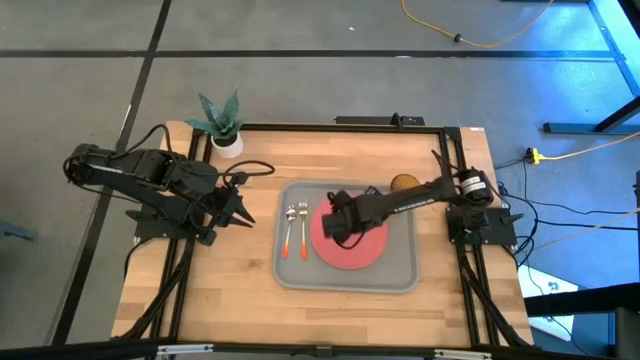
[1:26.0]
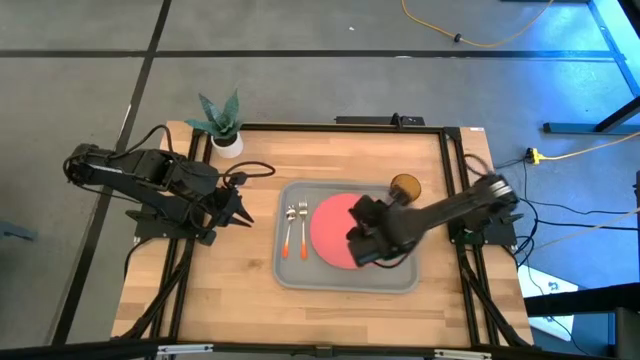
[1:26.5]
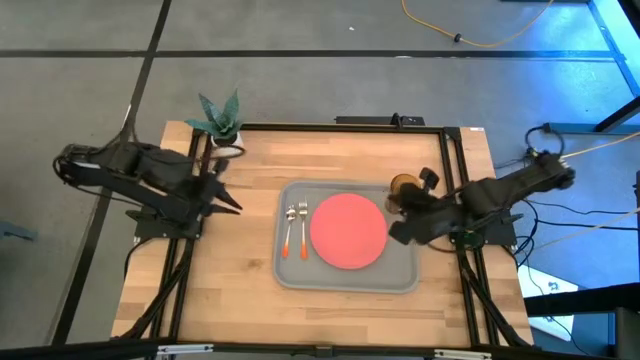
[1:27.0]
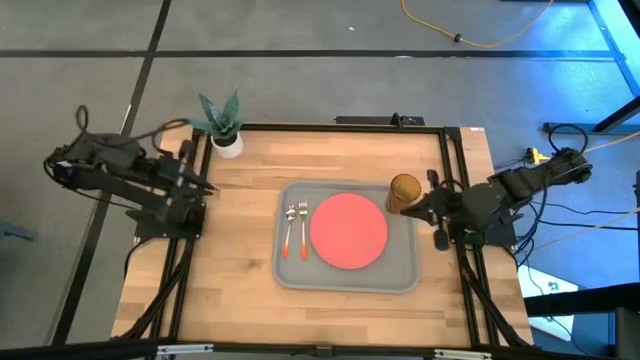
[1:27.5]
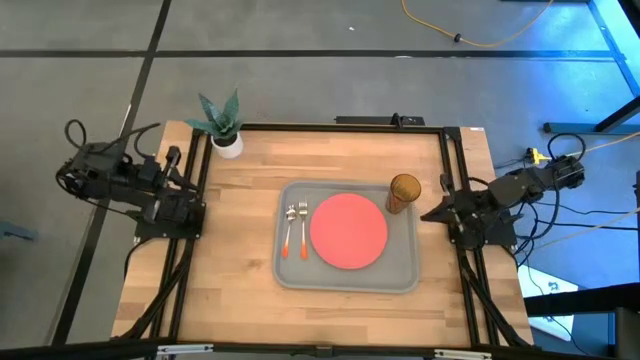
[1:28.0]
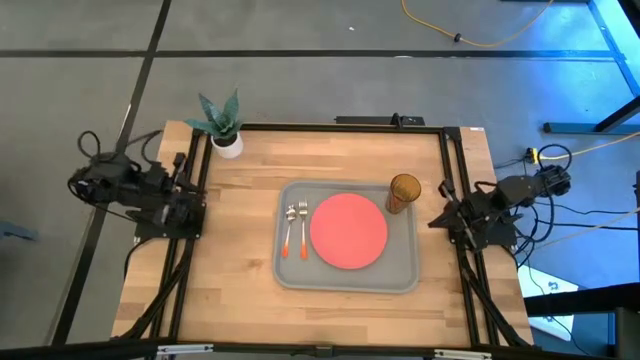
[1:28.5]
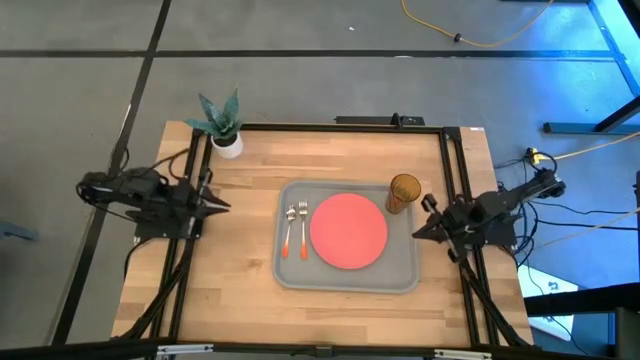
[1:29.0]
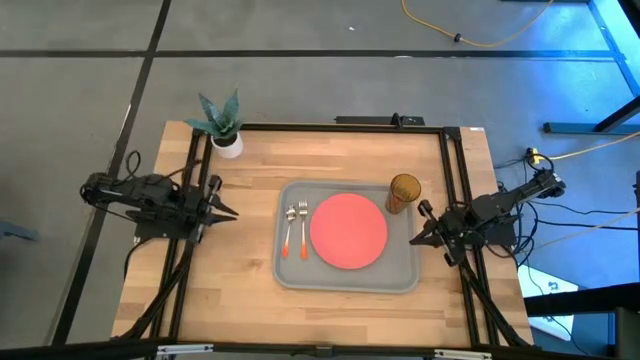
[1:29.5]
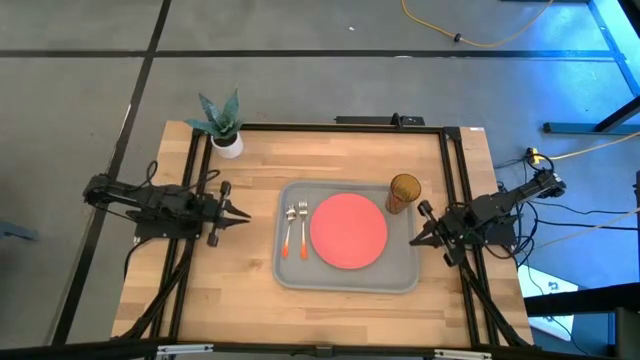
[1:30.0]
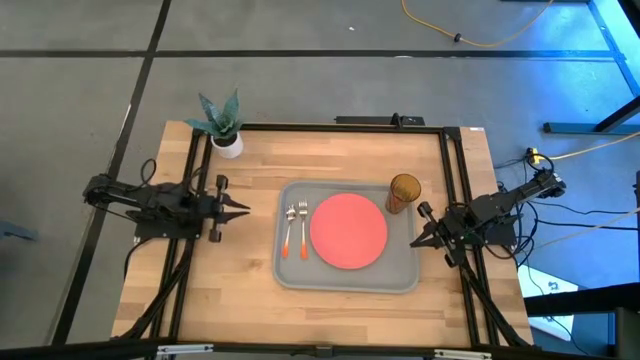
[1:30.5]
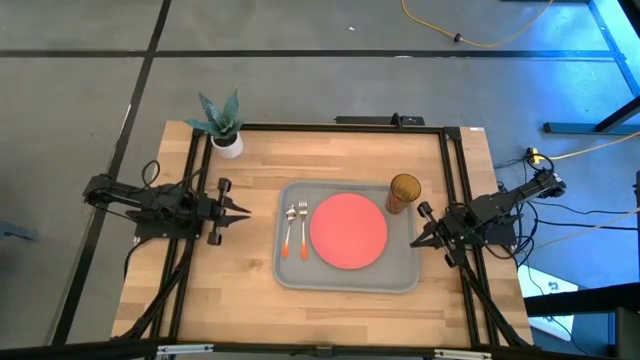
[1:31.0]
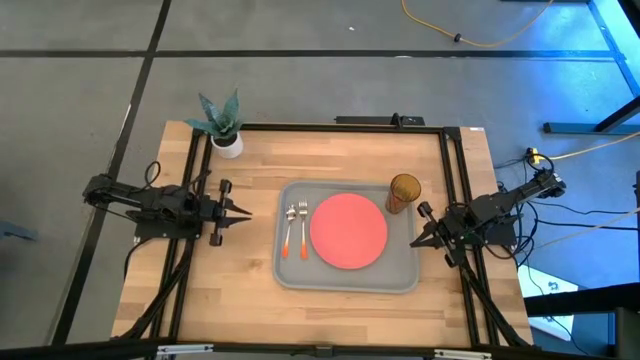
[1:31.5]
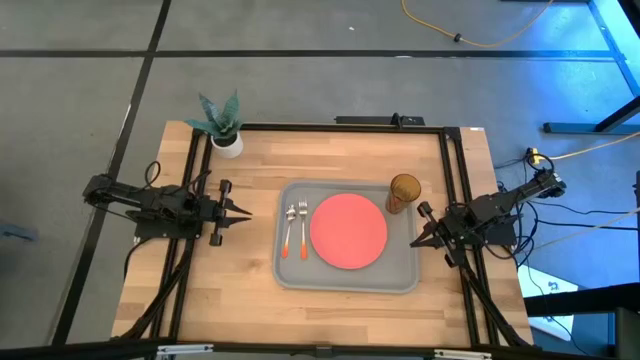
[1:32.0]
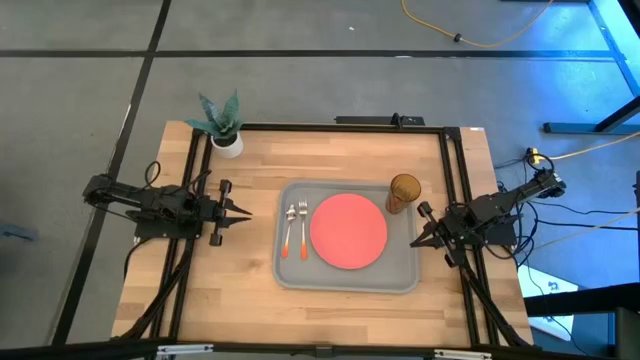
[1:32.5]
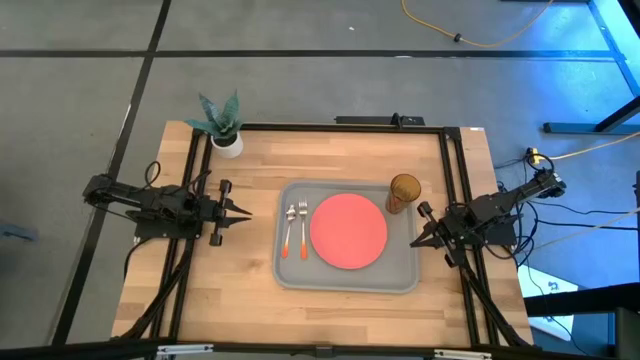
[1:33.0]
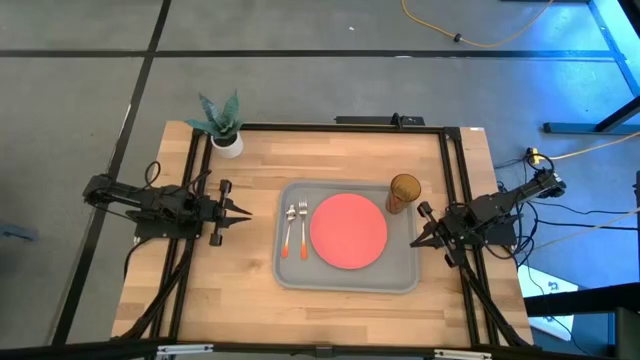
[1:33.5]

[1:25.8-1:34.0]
Task: Pick and place plate/cup/fork/spoon on tray
Return to Home Position

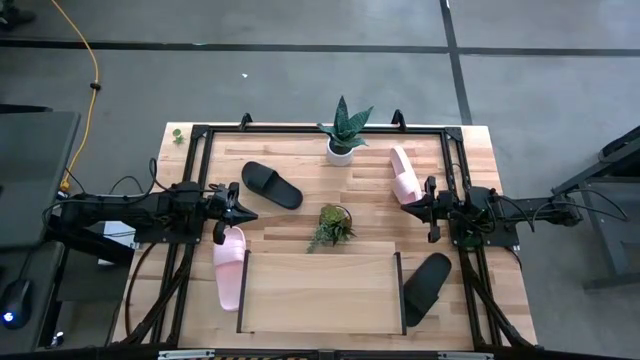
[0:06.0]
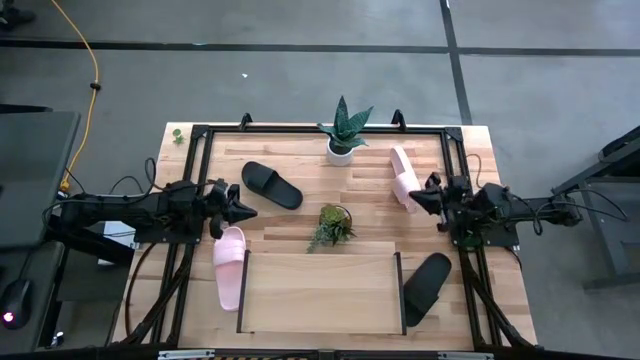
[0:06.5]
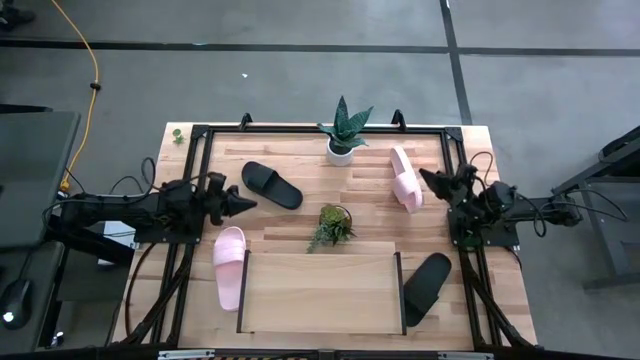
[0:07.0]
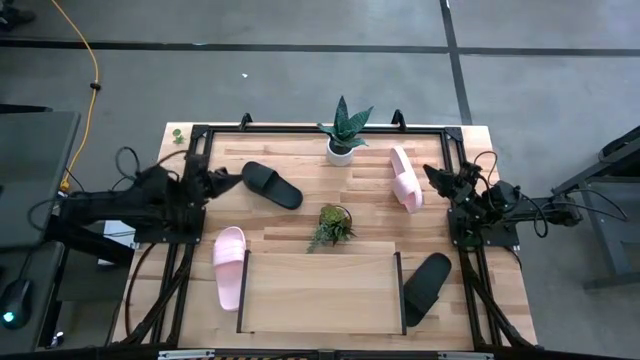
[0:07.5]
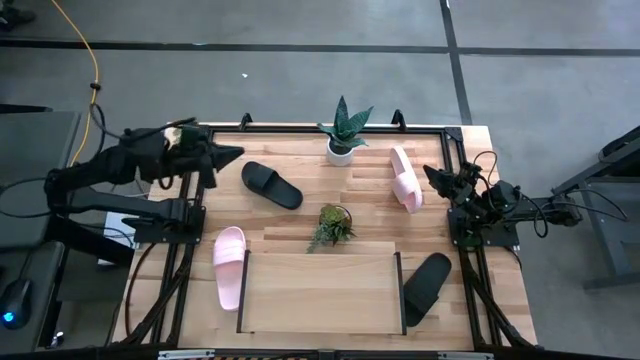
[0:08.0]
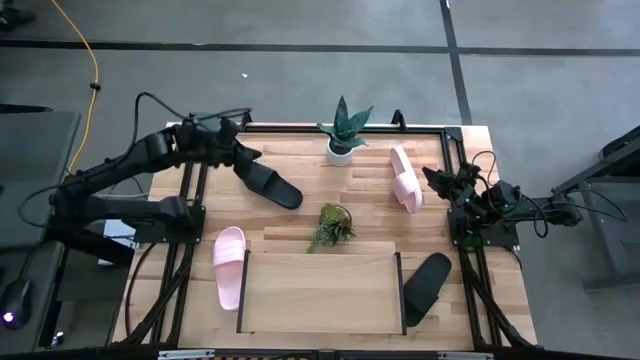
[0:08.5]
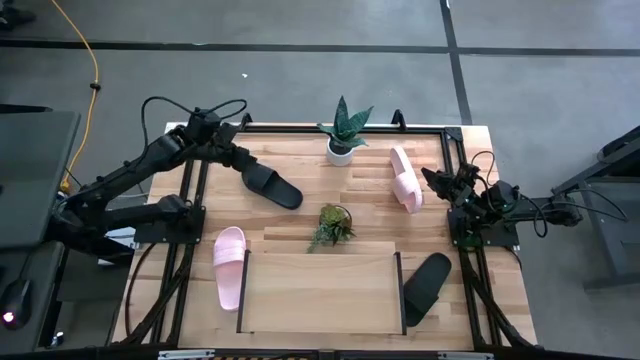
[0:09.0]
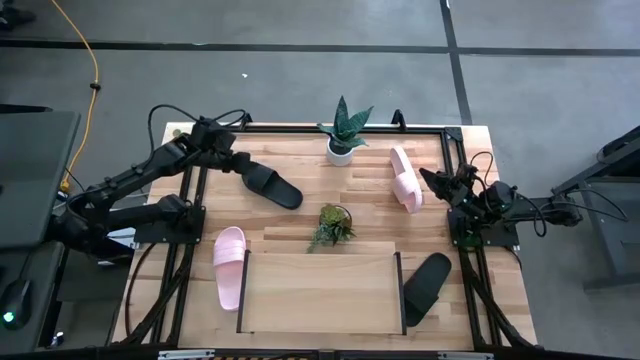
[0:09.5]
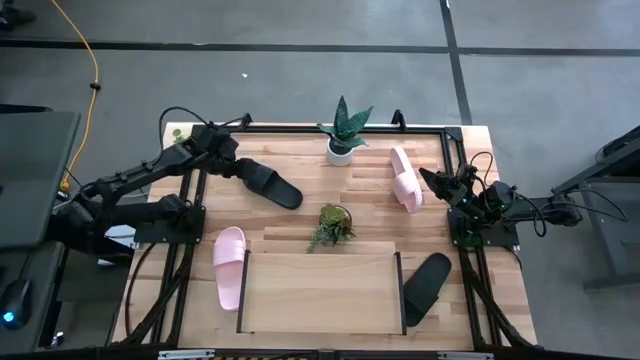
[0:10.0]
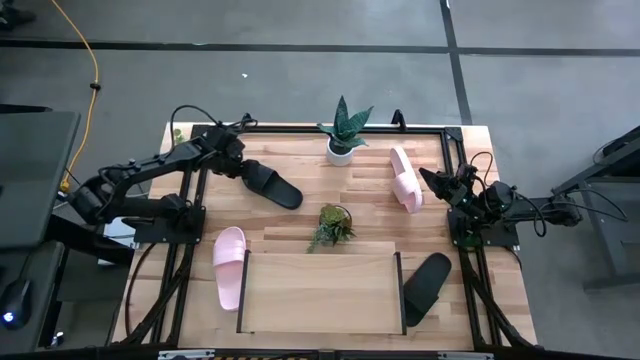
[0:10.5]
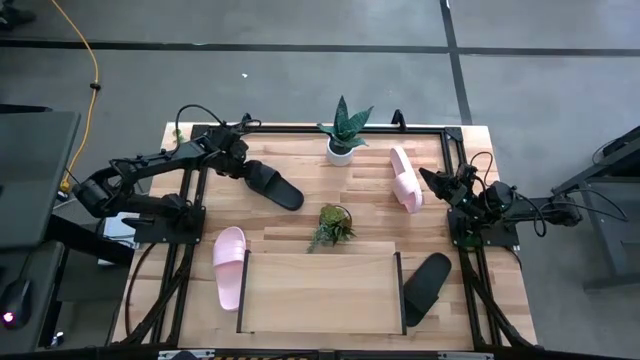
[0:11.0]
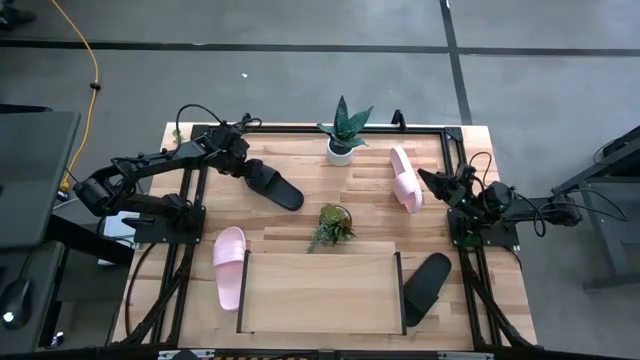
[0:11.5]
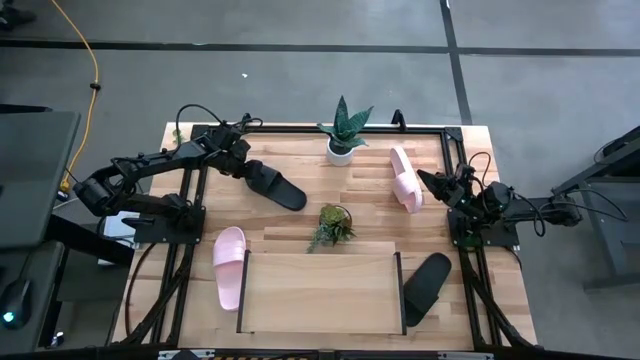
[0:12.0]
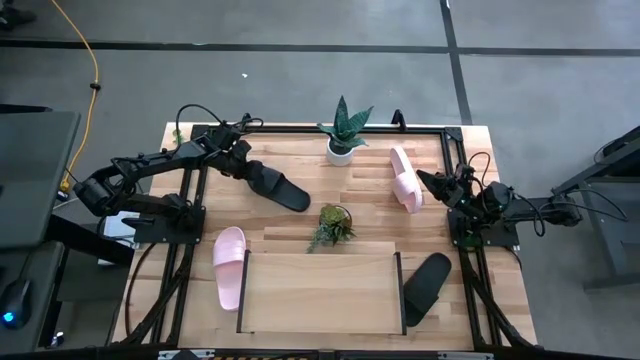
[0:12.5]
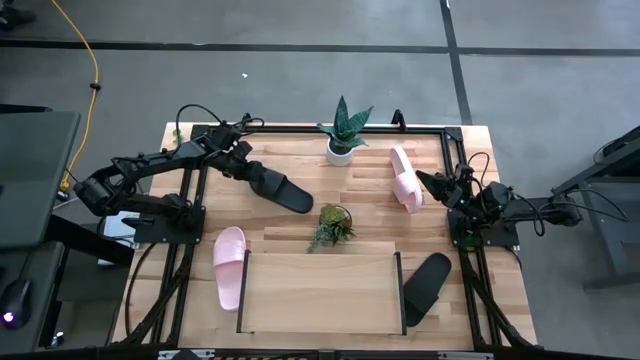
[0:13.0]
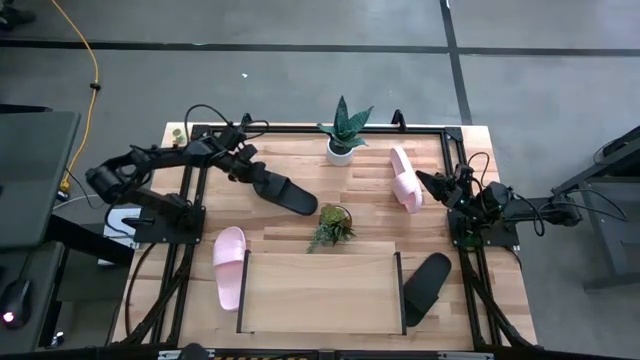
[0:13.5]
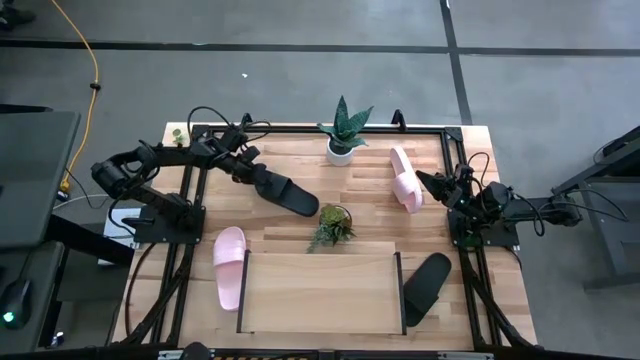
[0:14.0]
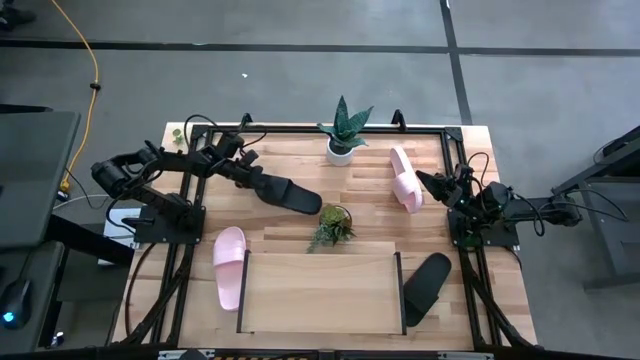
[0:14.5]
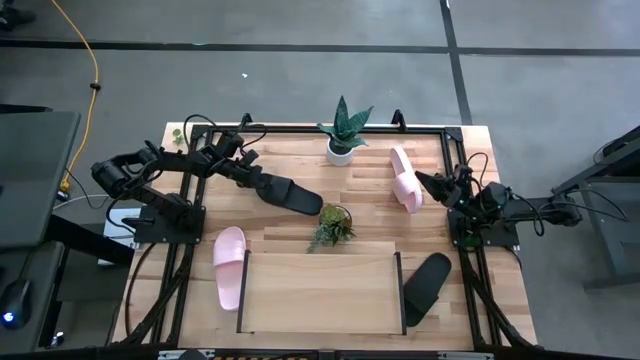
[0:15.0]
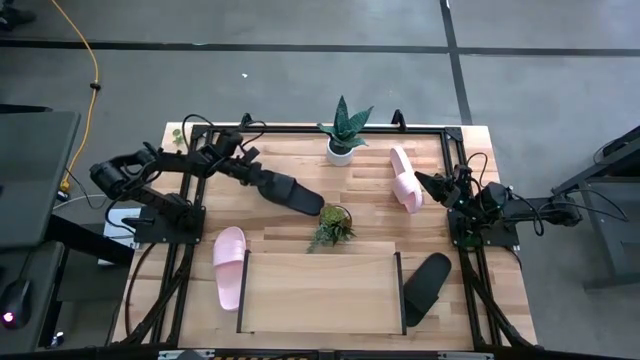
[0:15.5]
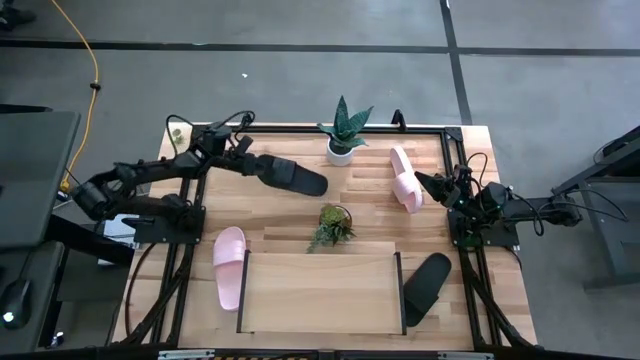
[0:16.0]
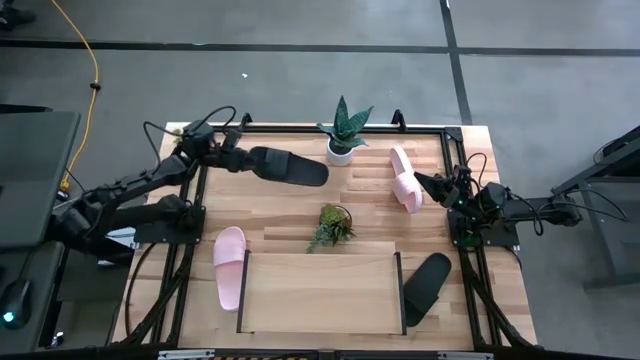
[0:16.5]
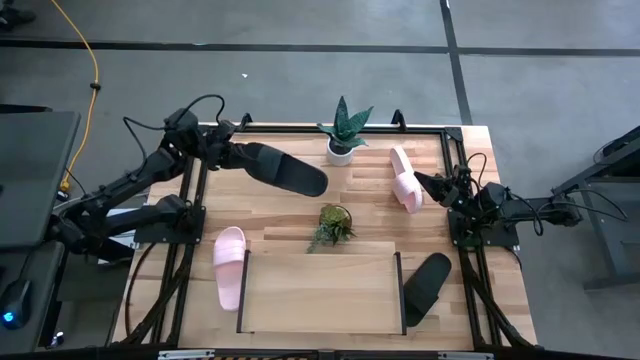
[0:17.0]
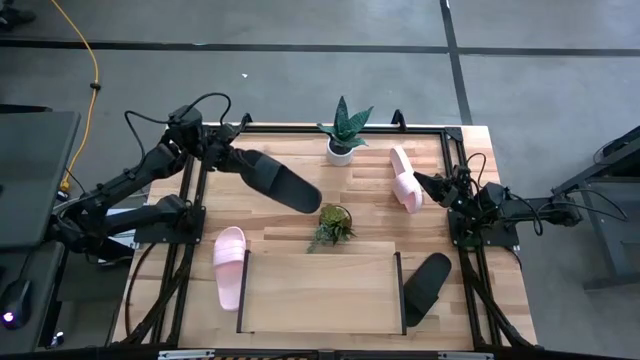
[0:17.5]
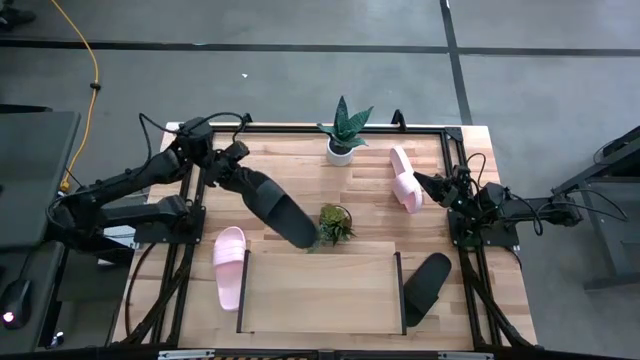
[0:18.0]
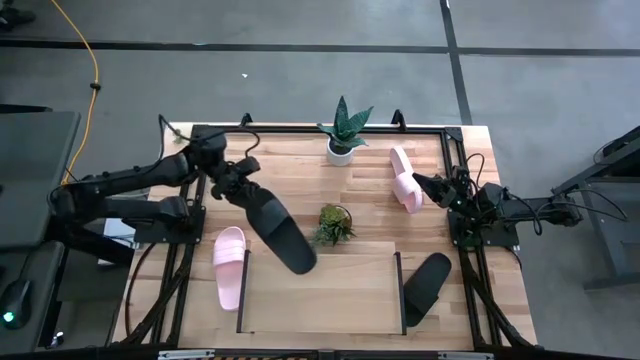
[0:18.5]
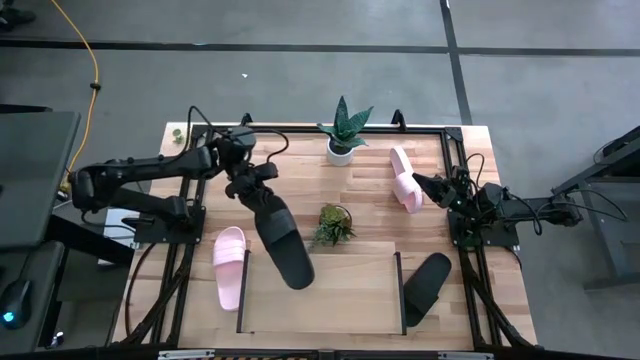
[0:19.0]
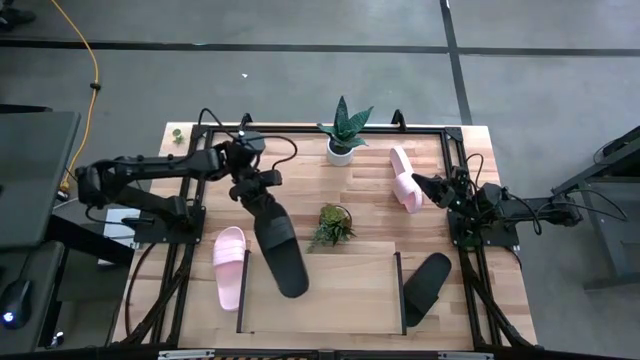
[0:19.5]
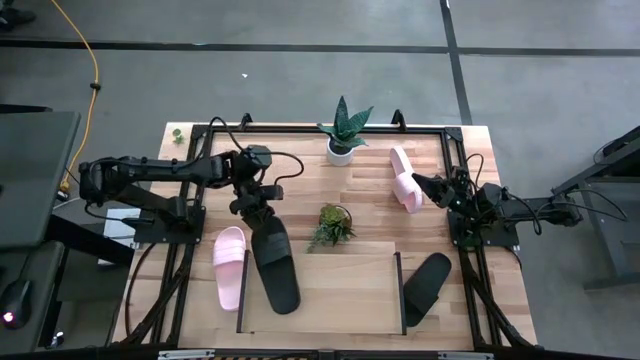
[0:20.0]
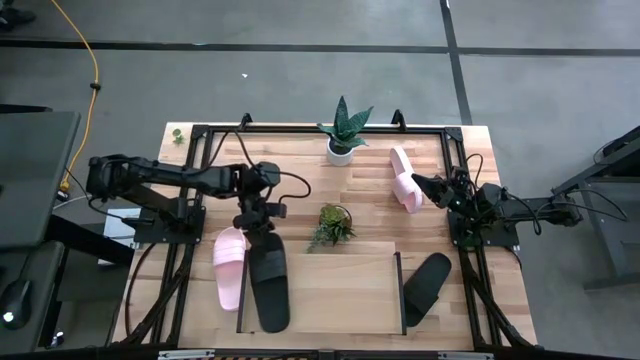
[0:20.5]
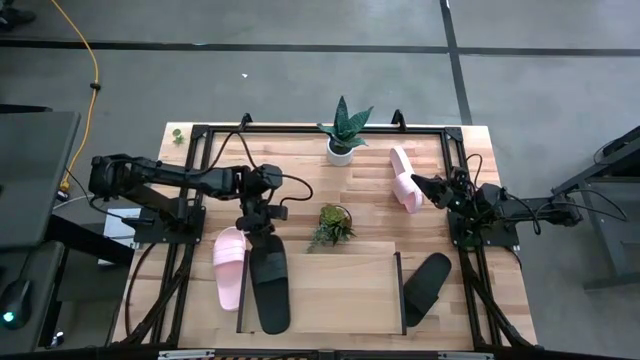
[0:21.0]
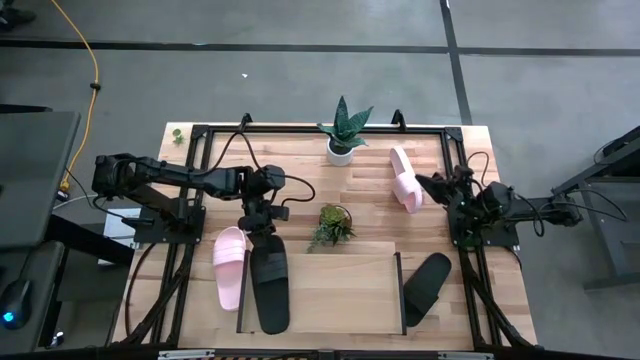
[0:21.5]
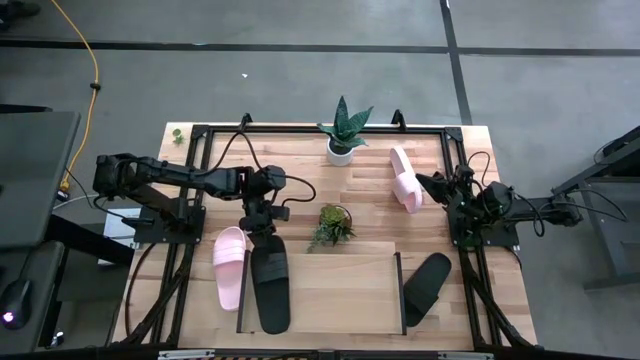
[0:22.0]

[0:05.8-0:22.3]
Task: Pick and place slides into the shelf
Put the top black slide on the shelf
